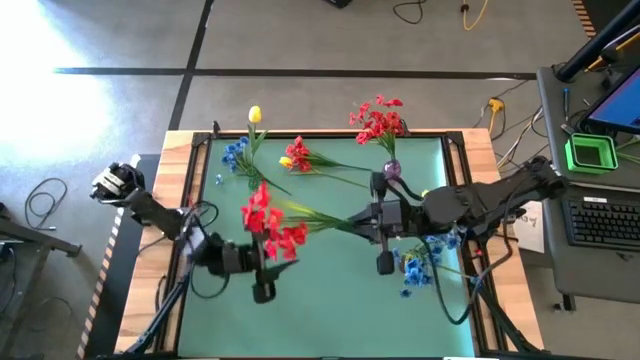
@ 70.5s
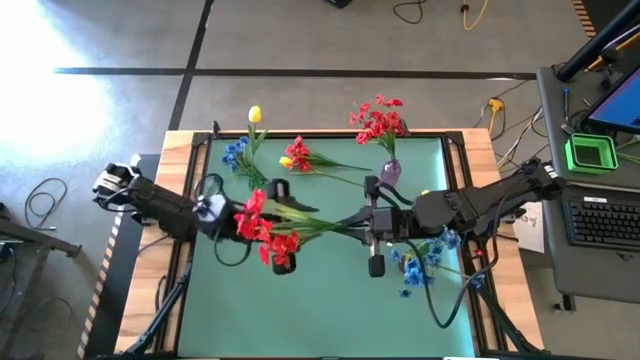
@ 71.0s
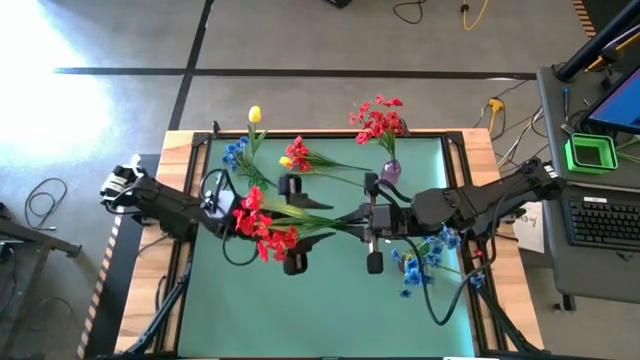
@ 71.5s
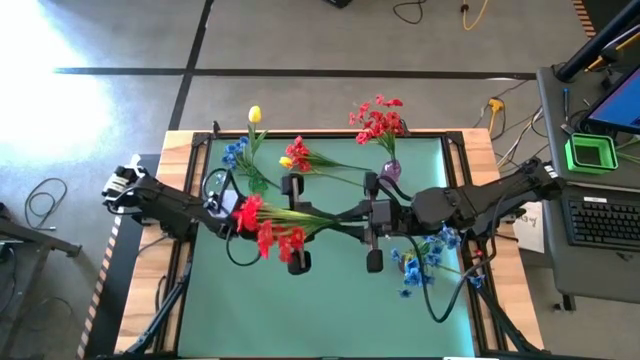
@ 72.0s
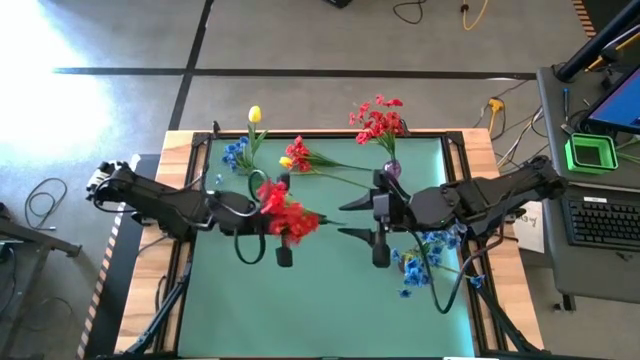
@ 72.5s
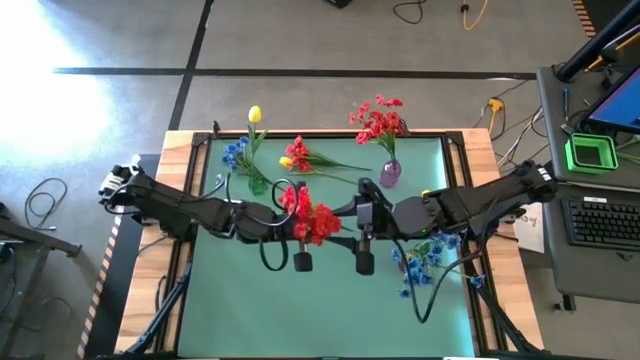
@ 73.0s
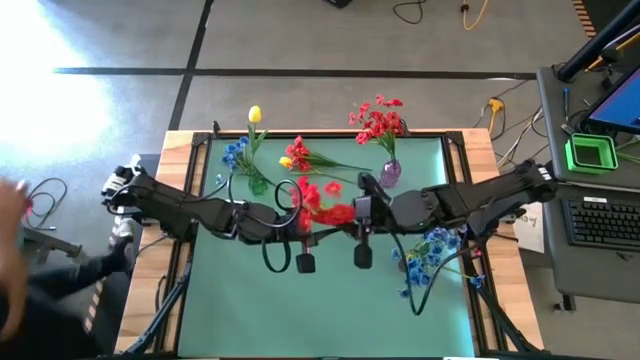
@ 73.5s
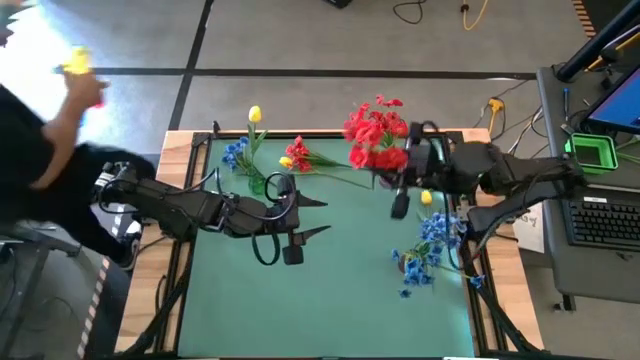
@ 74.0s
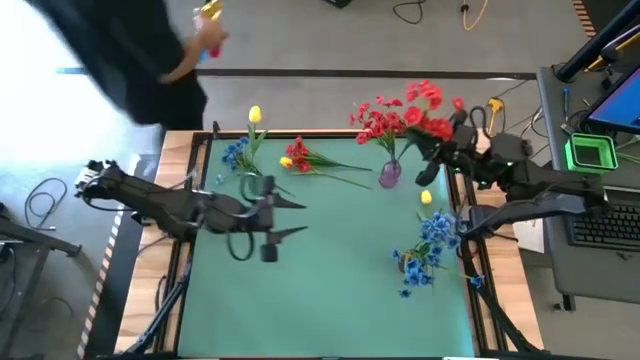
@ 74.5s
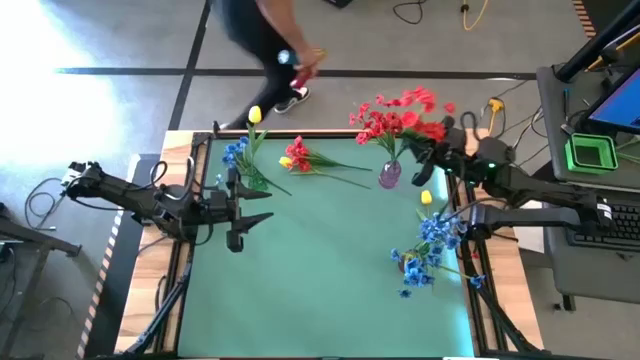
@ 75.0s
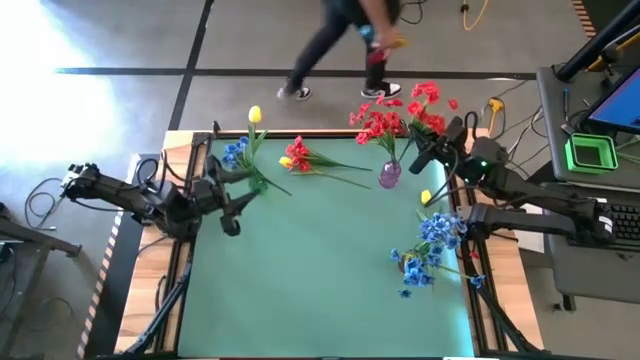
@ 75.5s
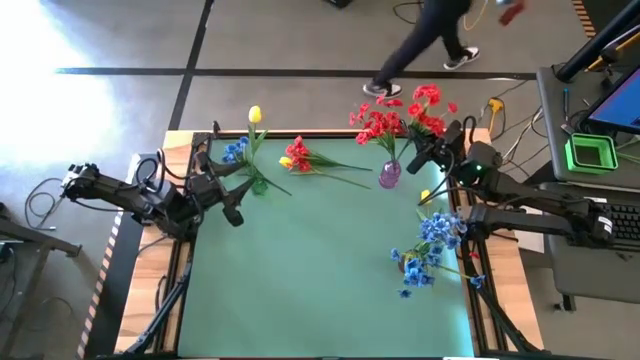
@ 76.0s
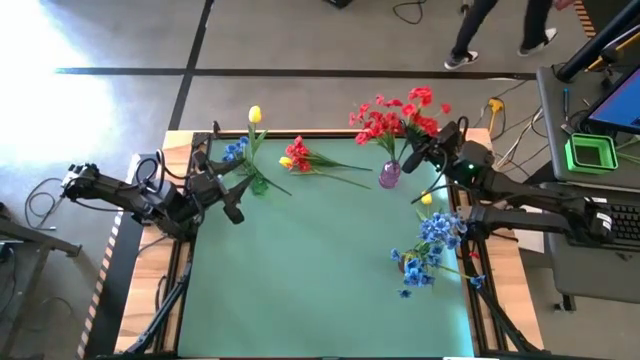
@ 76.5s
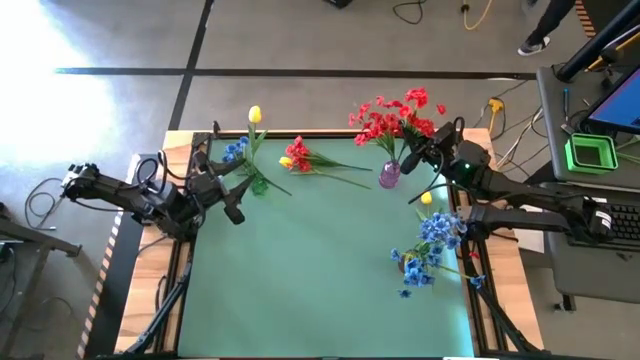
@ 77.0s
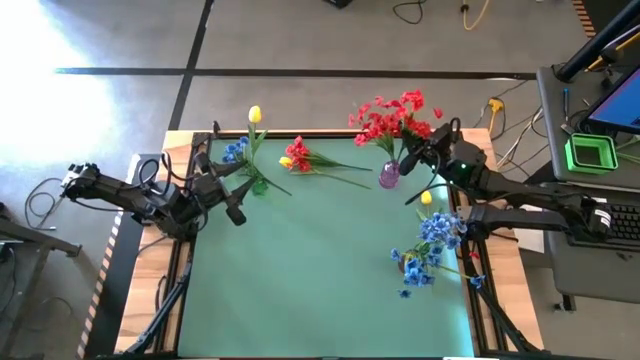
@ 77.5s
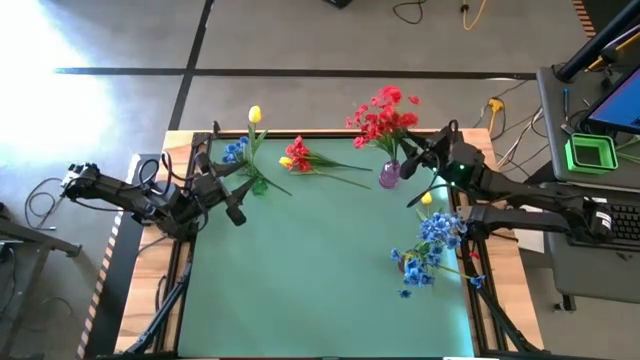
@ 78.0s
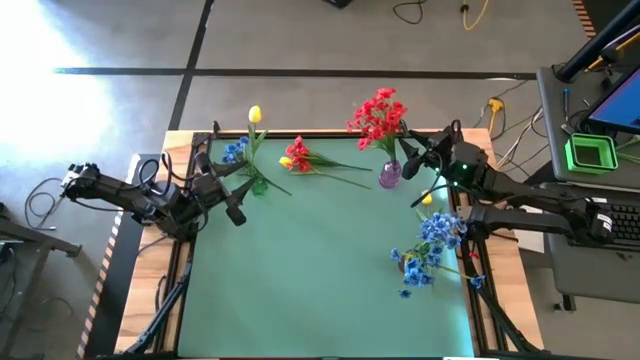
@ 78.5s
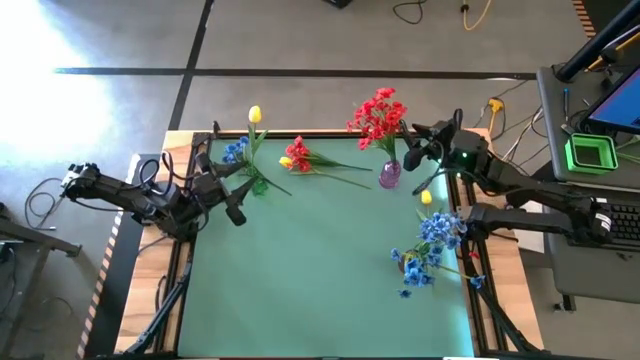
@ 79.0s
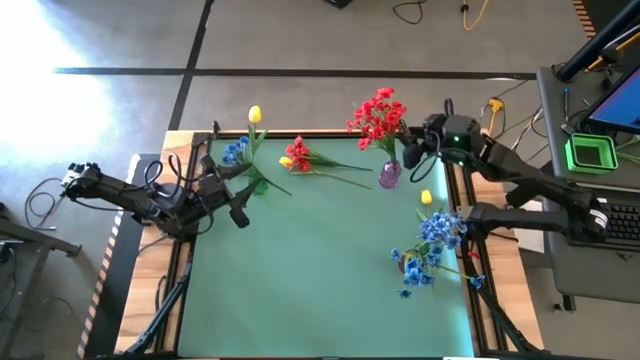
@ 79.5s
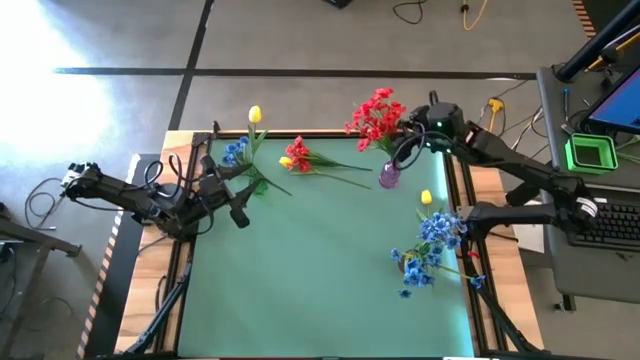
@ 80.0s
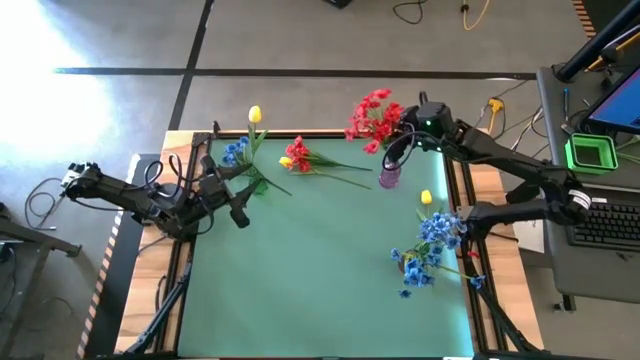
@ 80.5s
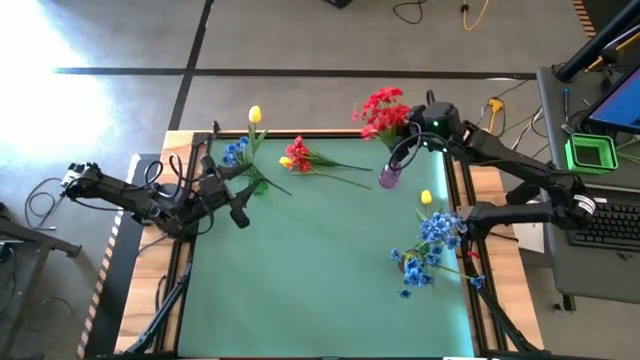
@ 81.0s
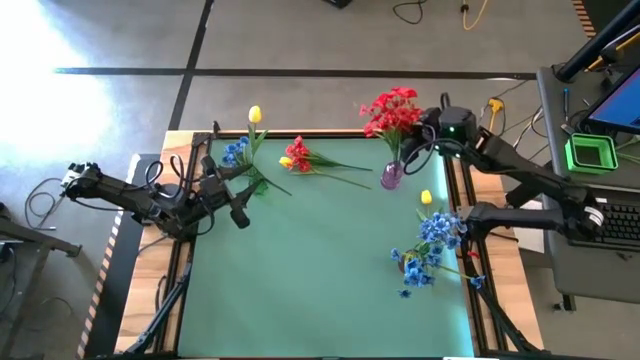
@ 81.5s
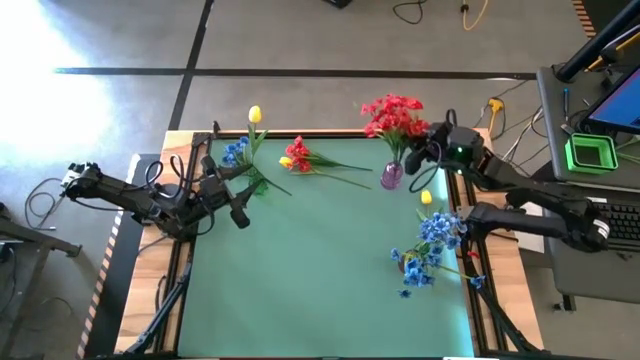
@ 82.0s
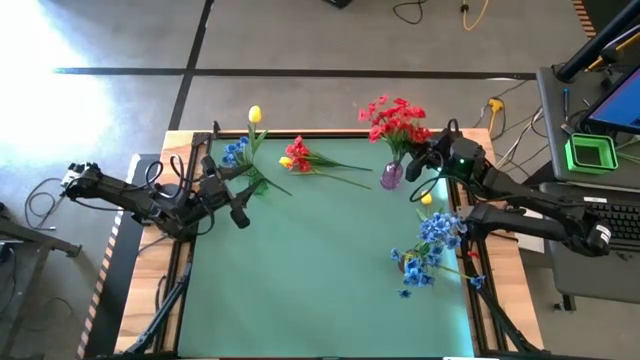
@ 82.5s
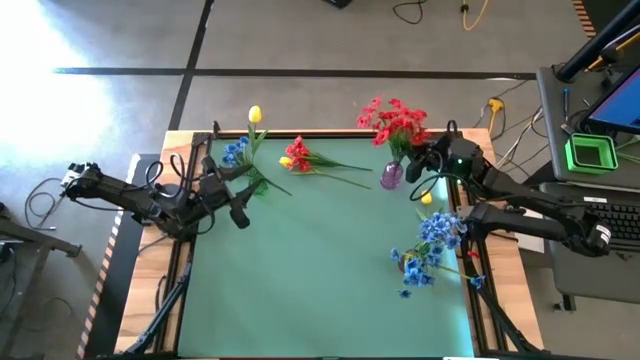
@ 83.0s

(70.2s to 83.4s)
Task: Sort flowers into vase by color
Put the bottom red flower into the purple vase

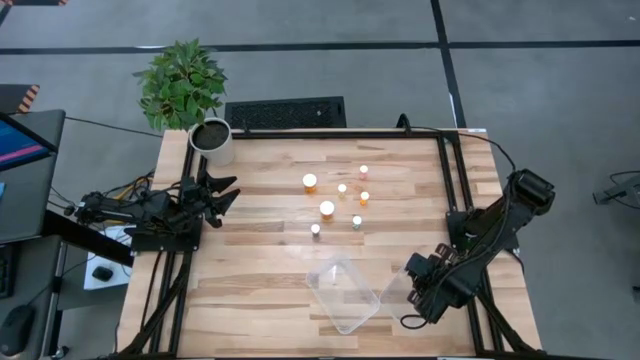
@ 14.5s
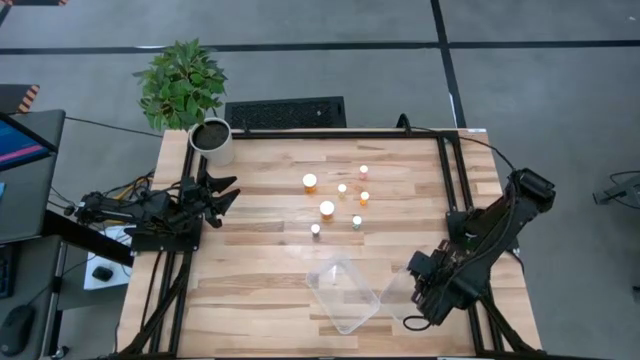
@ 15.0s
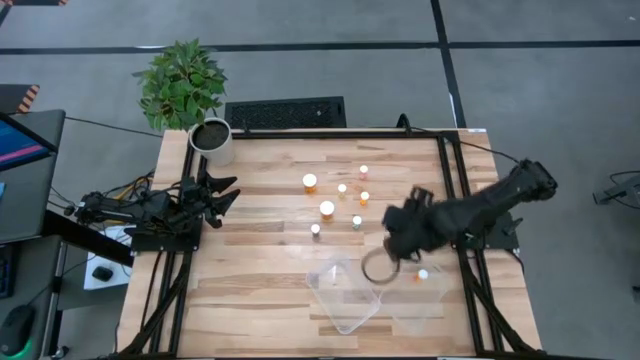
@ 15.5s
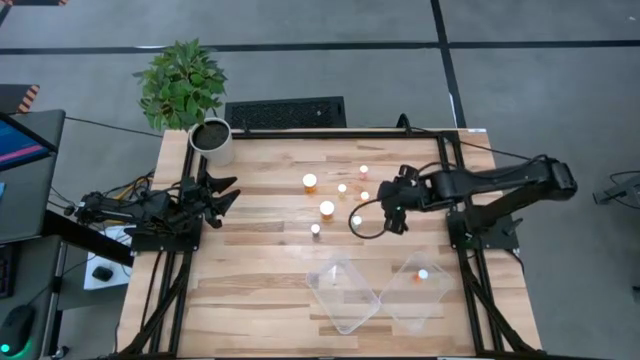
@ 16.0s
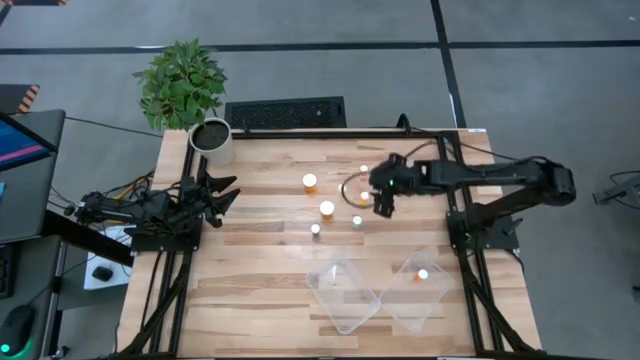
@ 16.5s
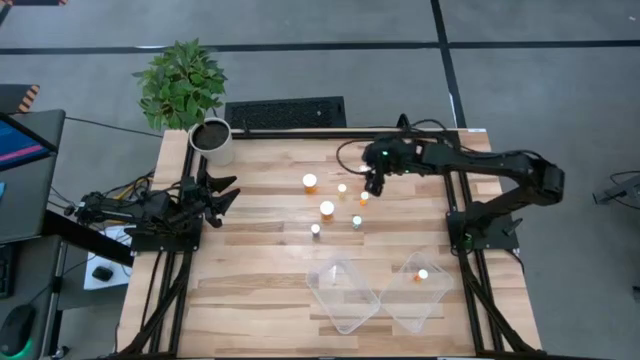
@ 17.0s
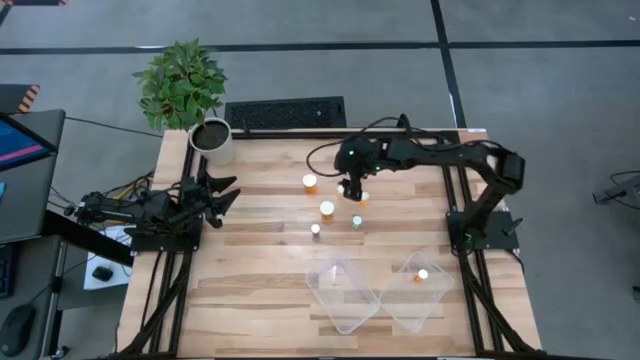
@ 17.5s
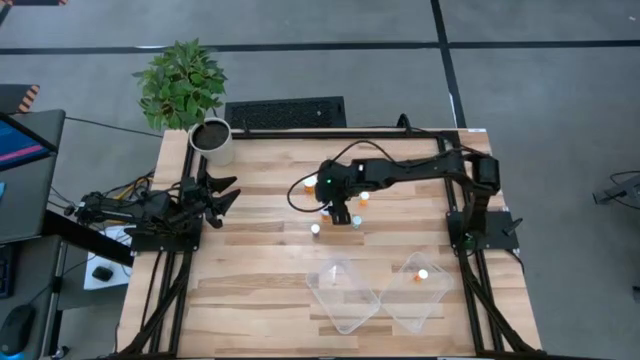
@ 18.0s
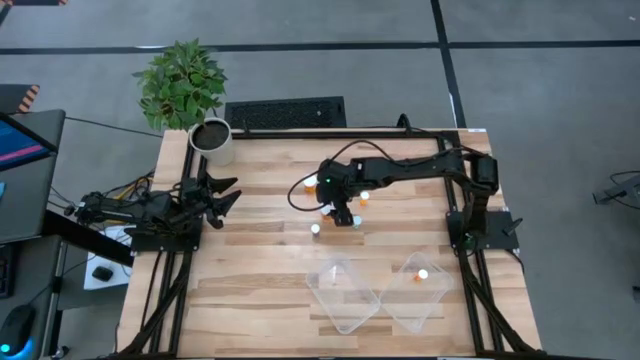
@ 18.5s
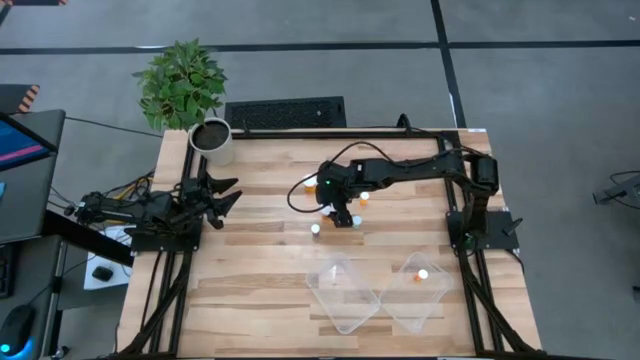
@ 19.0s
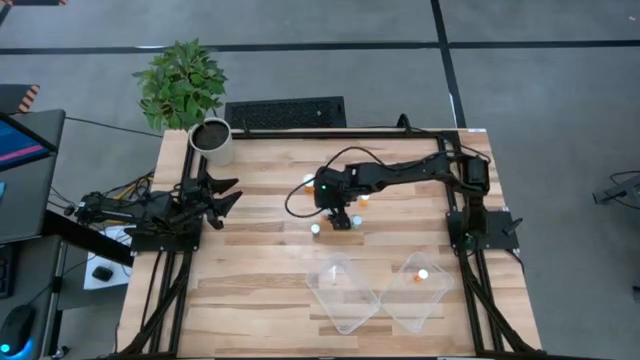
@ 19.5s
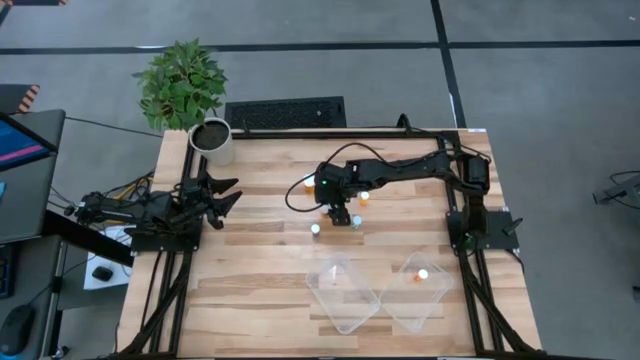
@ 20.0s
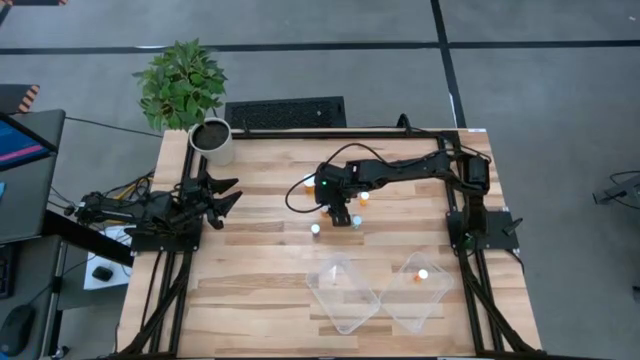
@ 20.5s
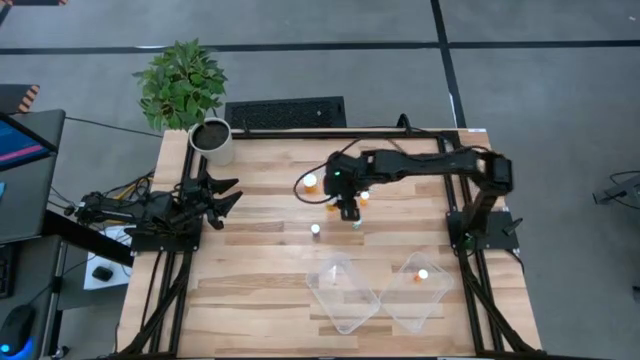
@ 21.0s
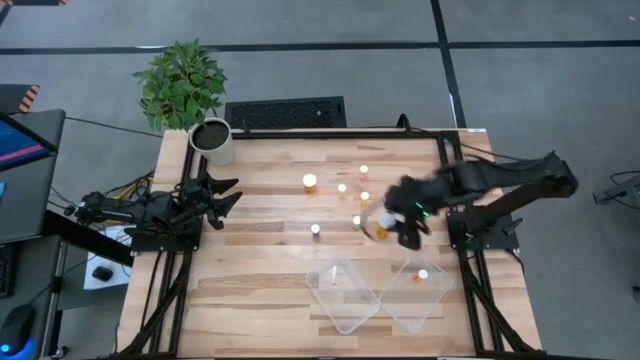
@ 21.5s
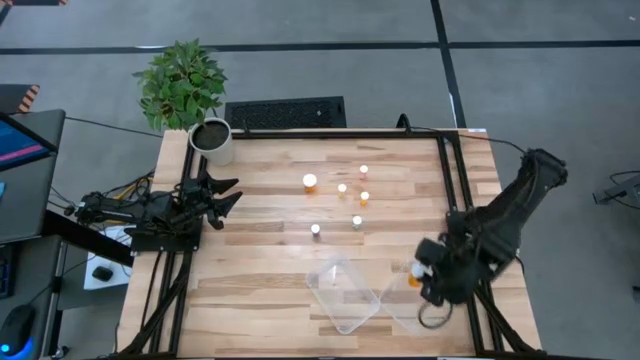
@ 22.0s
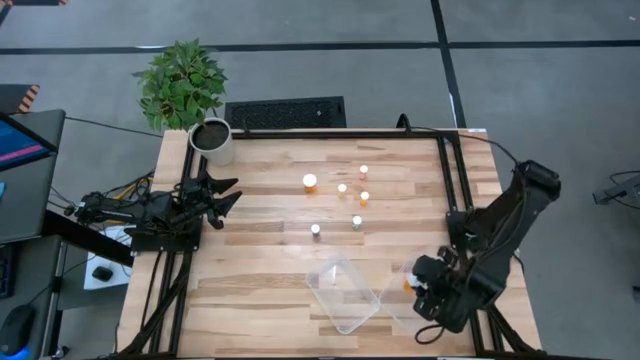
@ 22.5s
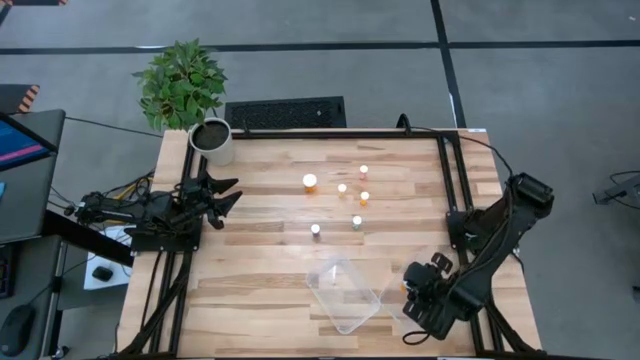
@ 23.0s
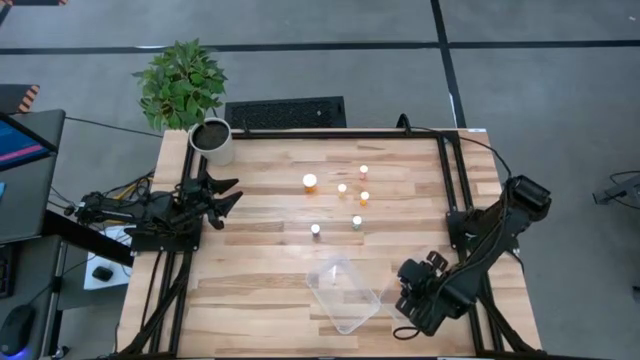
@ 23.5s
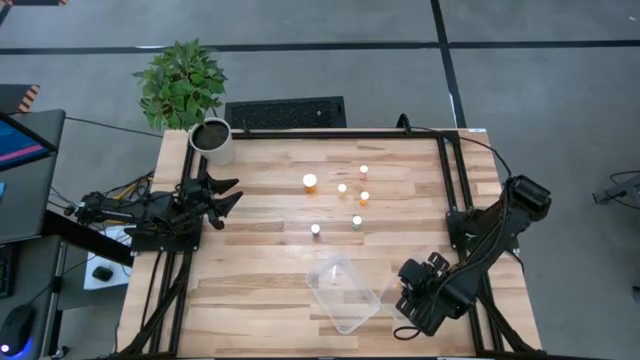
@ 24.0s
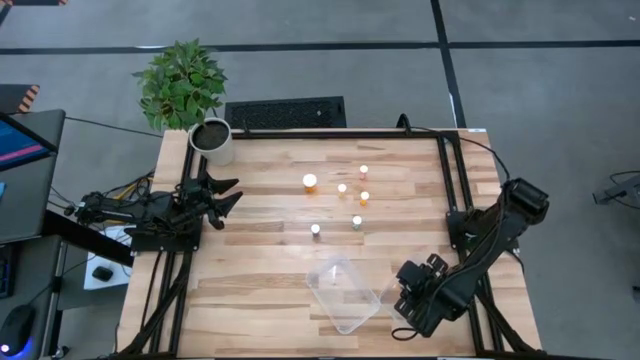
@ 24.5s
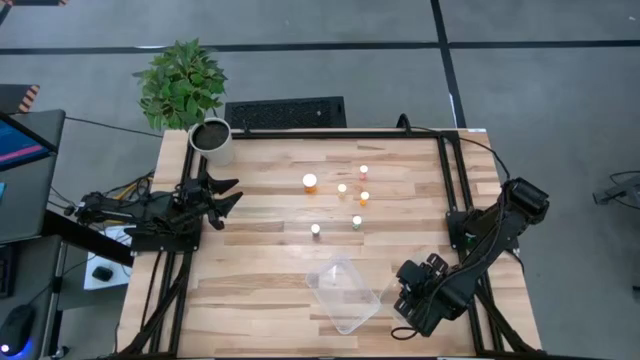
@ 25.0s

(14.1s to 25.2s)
Task: Pick and place medicine bottles into bin by pill shape (circle, oval)
Put the bottom left orange pill bottle into the right transparent bin
